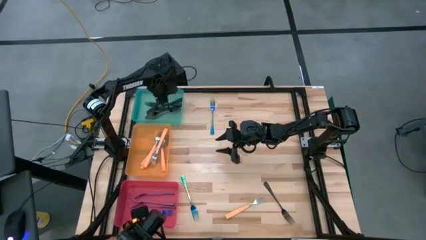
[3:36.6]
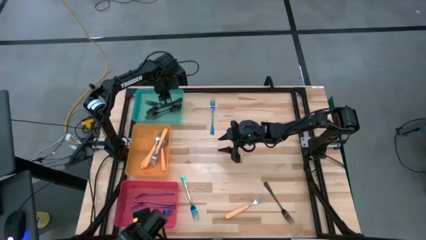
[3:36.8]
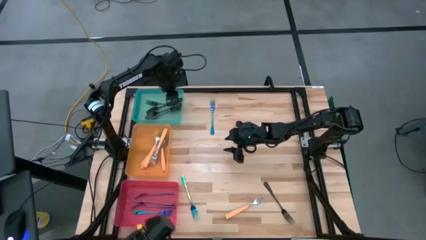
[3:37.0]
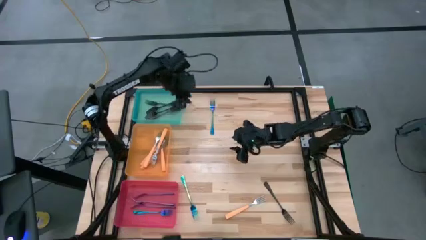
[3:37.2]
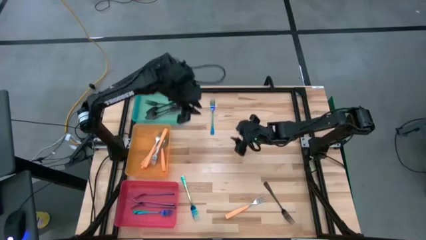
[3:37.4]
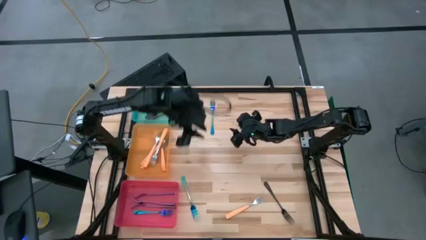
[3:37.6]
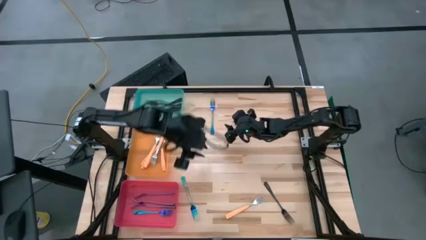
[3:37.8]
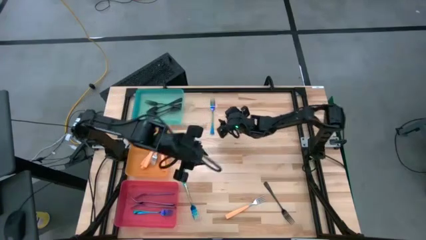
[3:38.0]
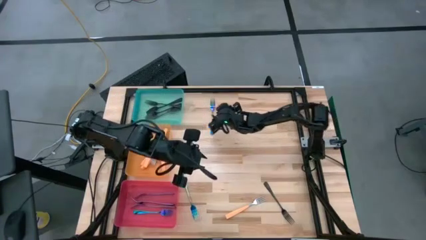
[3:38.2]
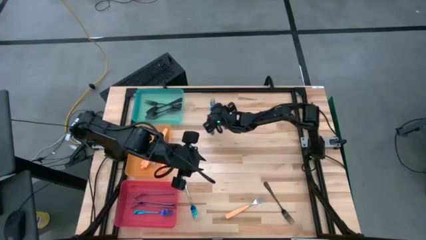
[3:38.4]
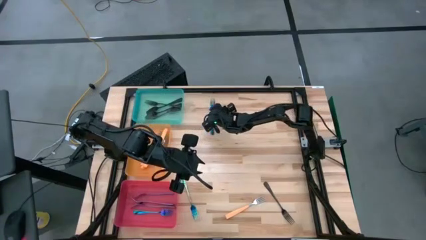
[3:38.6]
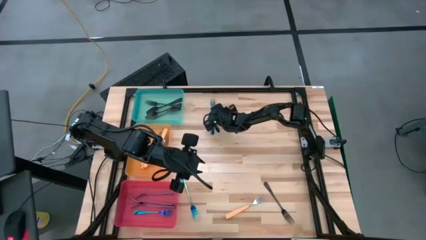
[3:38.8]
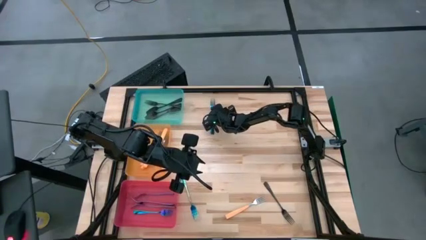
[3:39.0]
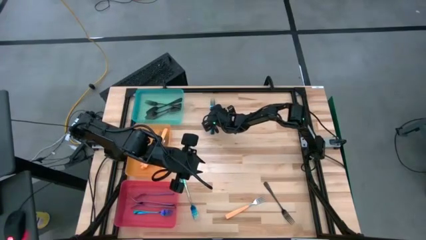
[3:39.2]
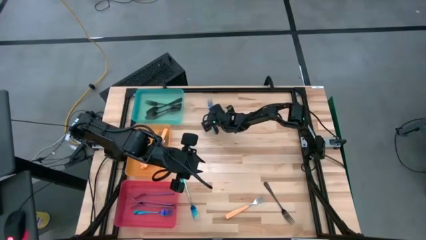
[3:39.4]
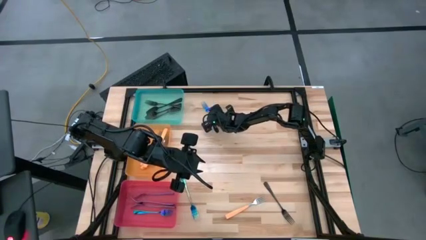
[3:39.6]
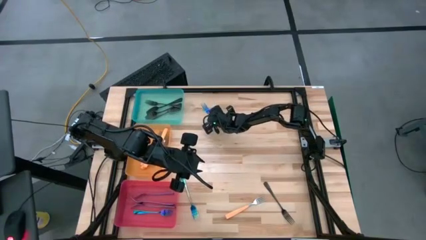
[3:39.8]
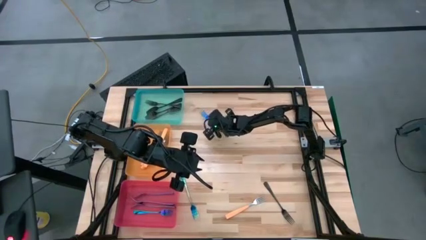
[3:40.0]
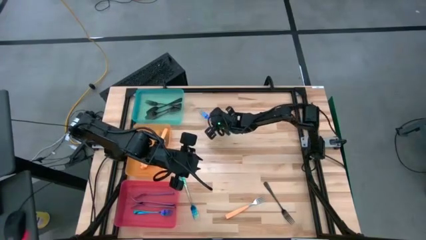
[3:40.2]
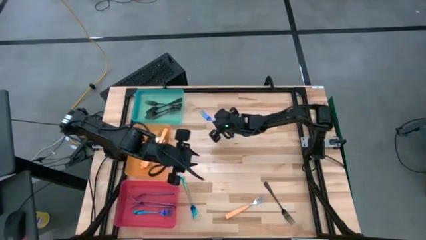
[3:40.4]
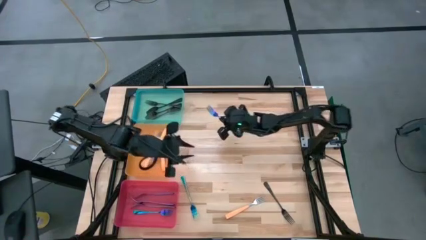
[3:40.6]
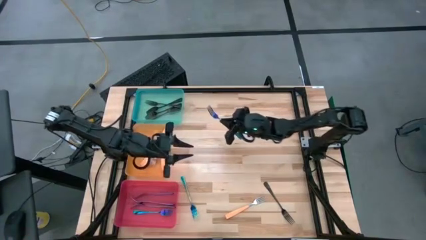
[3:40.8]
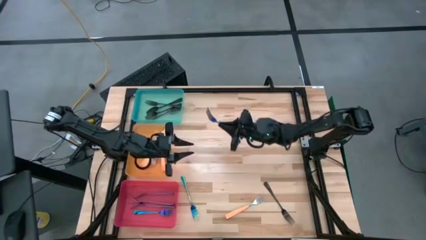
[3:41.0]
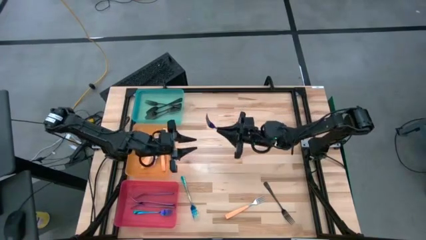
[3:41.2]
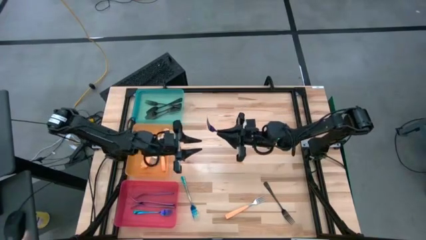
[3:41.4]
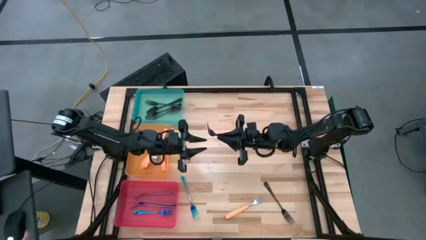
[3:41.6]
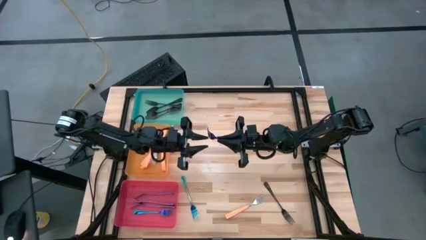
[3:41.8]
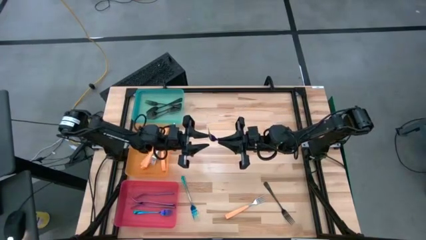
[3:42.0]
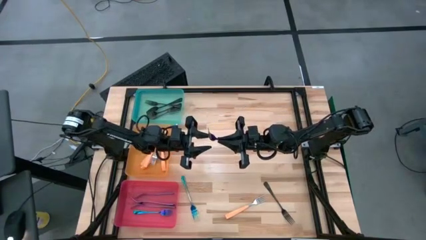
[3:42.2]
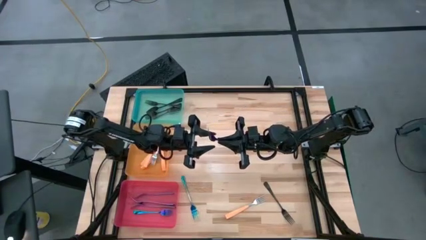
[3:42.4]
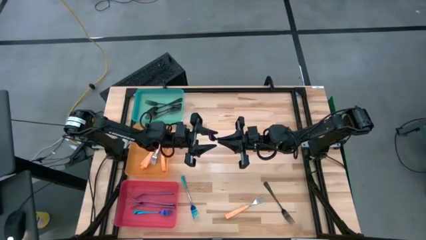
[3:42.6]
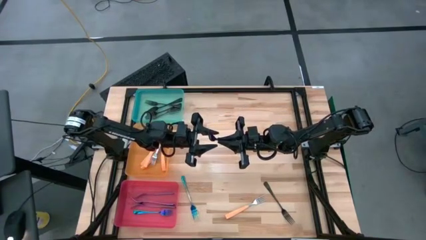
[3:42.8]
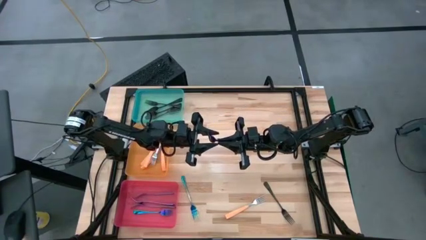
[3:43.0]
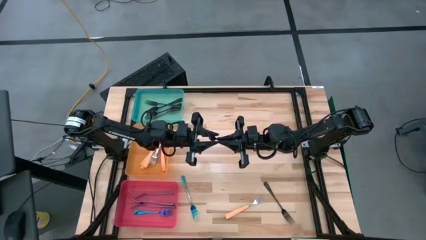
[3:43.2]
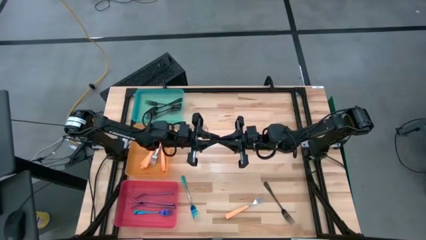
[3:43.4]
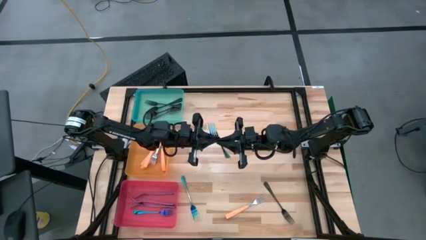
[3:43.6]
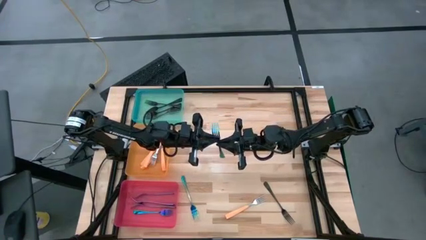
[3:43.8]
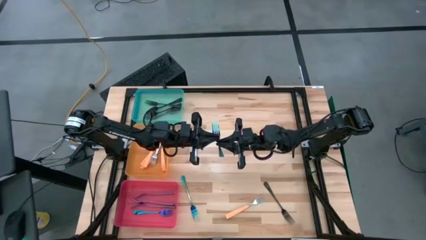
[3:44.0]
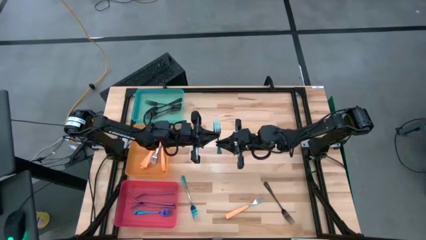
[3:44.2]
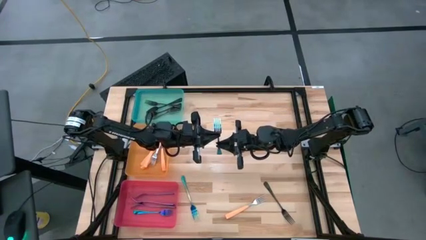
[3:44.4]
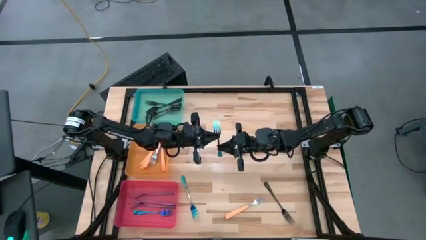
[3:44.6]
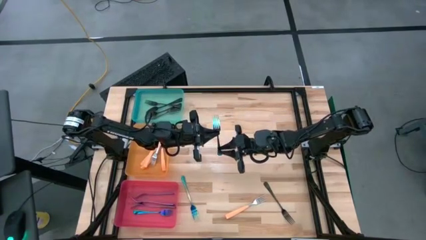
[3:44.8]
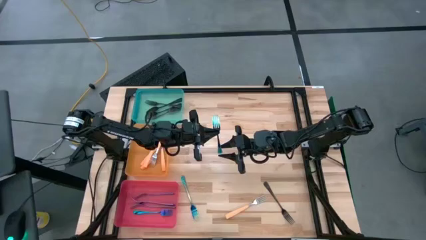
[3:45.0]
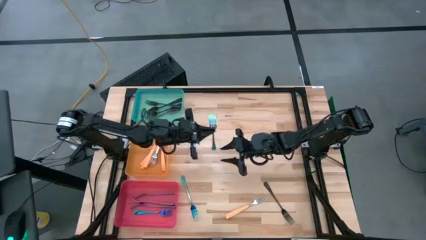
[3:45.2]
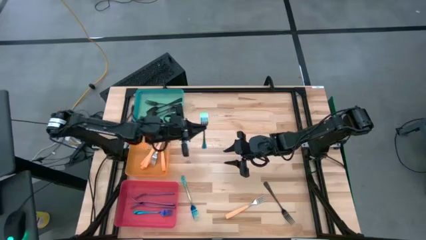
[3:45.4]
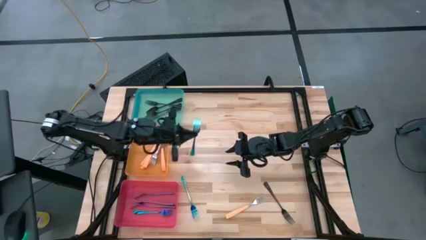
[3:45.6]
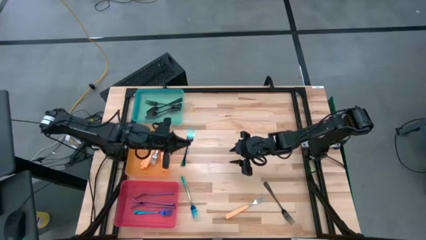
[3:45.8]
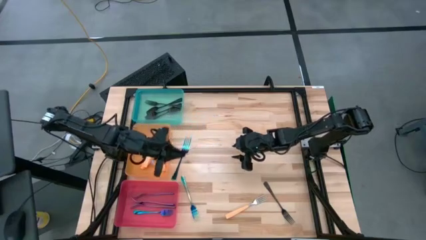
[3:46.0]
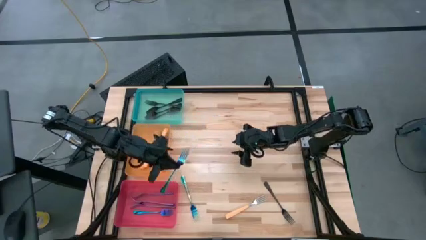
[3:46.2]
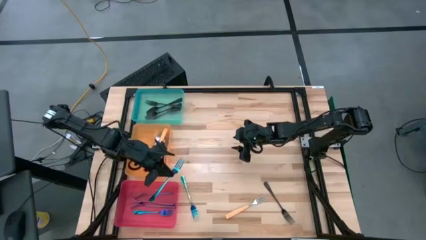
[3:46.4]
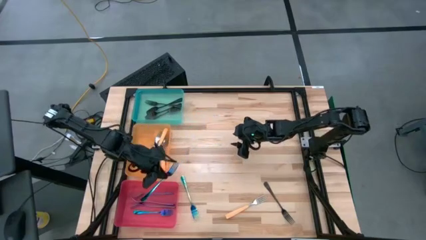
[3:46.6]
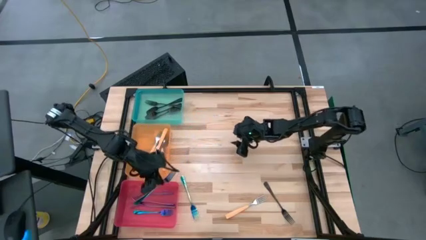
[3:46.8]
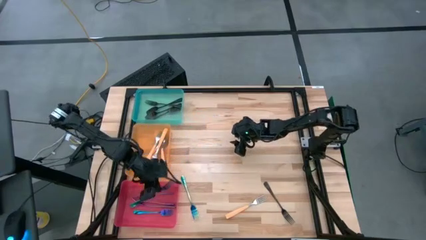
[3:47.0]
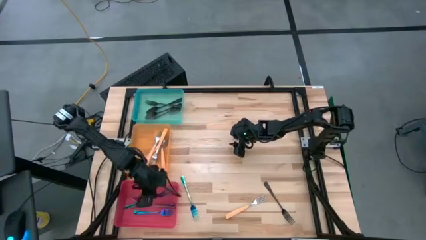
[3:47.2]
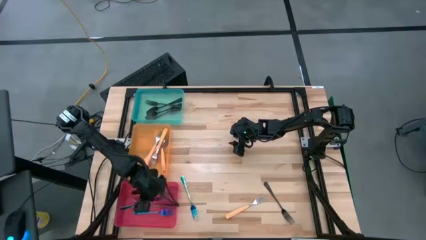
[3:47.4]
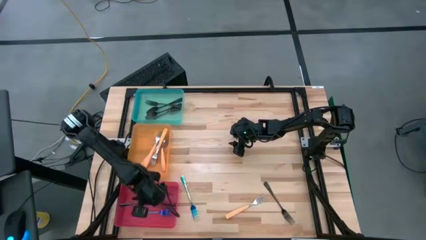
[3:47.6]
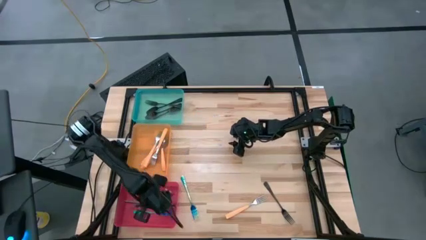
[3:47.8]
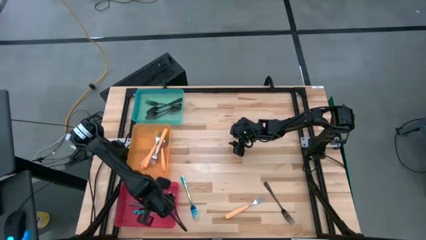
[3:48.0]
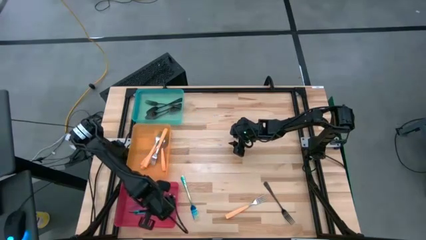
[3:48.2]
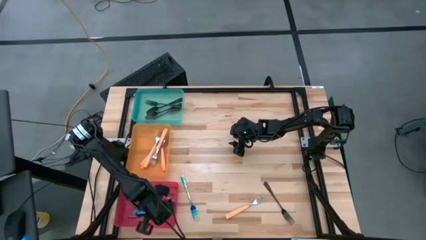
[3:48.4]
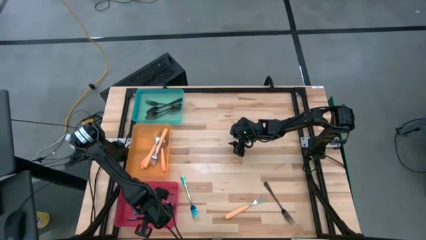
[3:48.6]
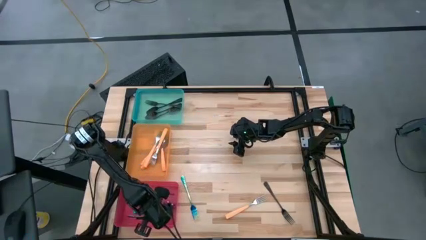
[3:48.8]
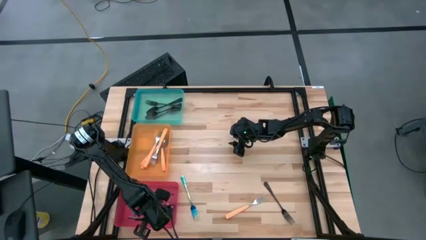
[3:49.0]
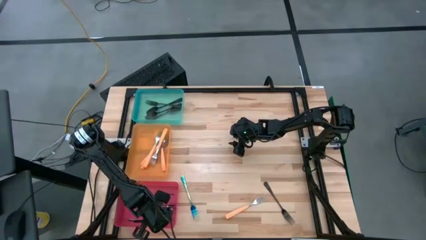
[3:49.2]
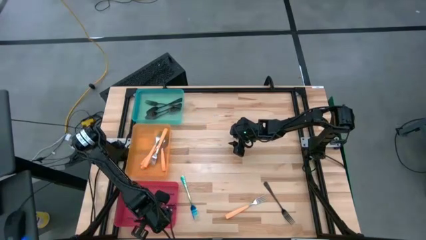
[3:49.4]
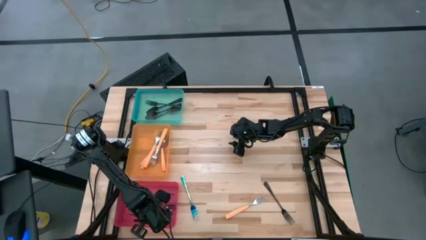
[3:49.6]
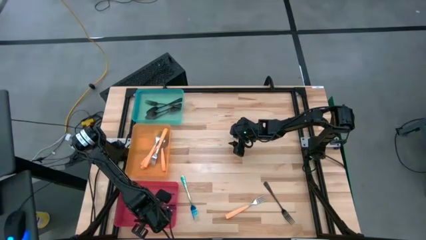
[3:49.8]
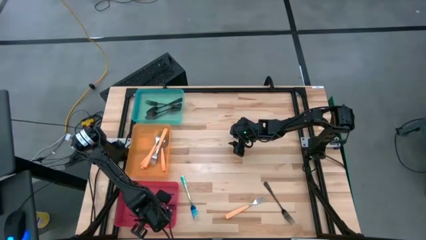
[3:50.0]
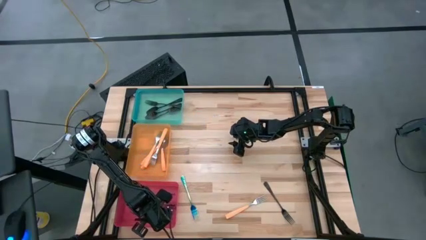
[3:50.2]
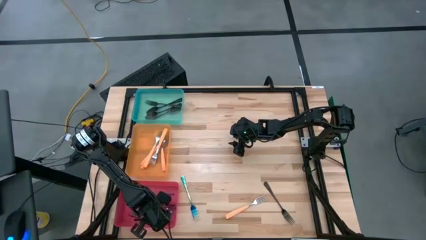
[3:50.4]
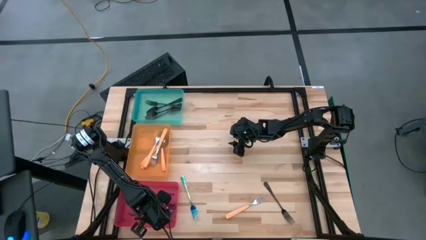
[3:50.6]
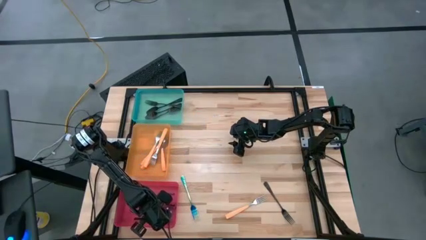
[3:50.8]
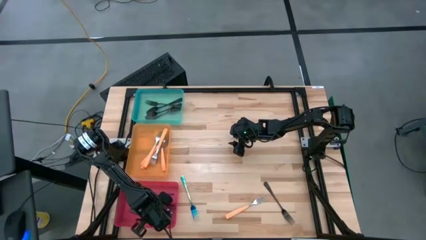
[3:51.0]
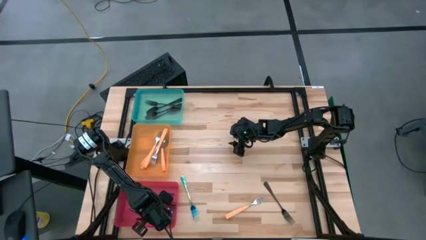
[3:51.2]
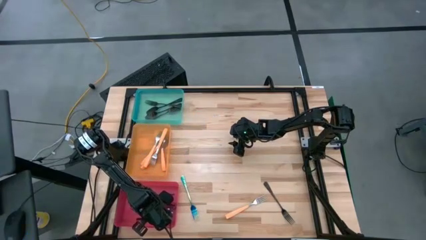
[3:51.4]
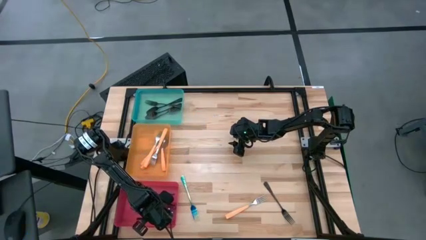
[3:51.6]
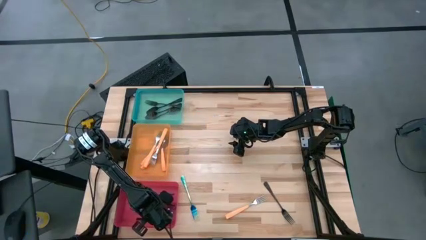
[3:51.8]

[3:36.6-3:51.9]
Task: Sort silverware by color (type)
Put the blue fork into the pink bin
